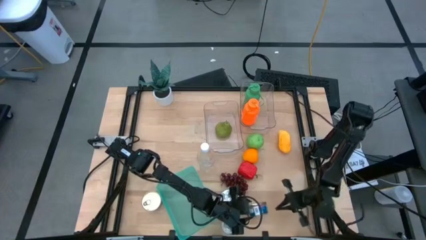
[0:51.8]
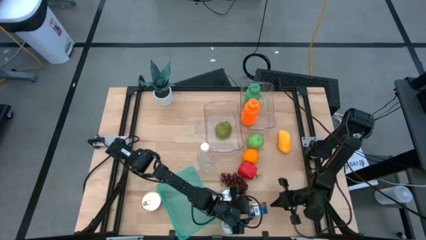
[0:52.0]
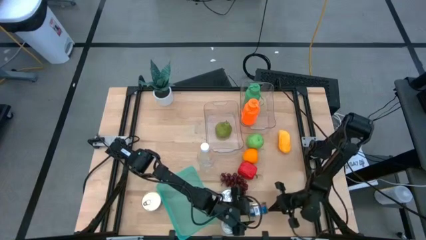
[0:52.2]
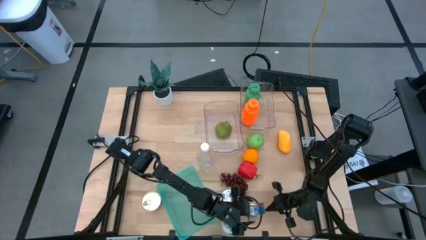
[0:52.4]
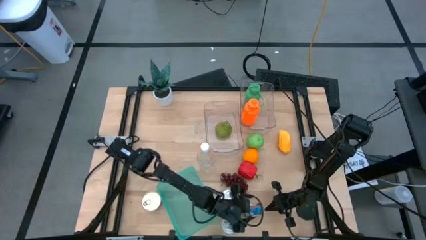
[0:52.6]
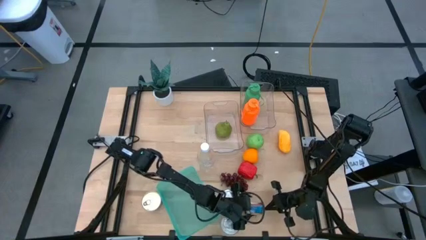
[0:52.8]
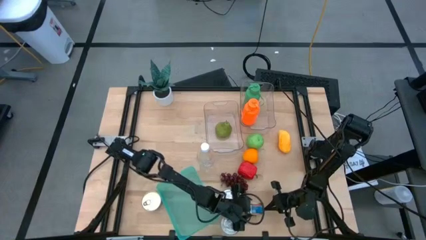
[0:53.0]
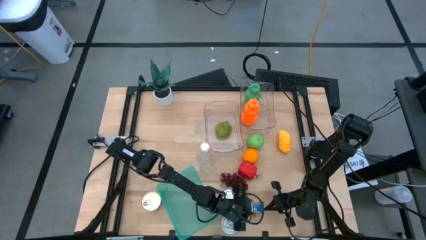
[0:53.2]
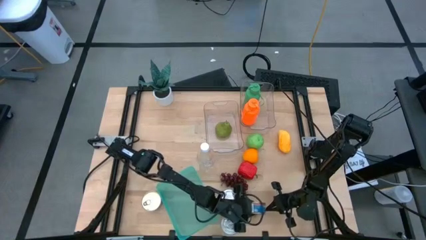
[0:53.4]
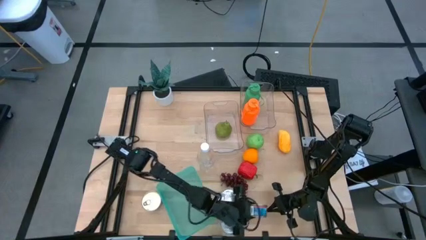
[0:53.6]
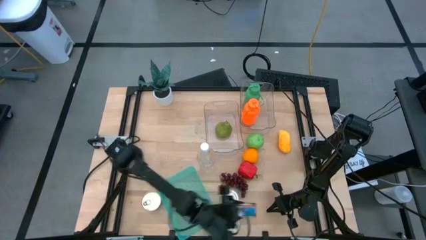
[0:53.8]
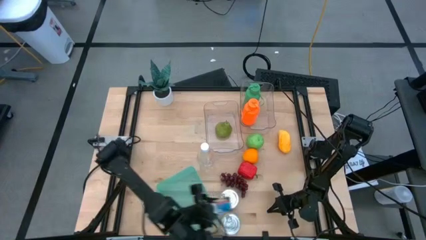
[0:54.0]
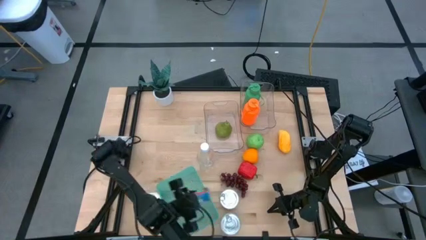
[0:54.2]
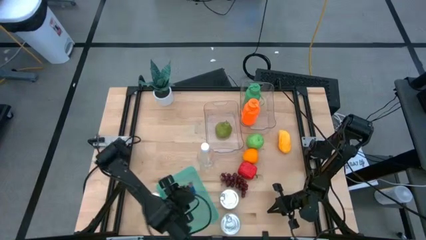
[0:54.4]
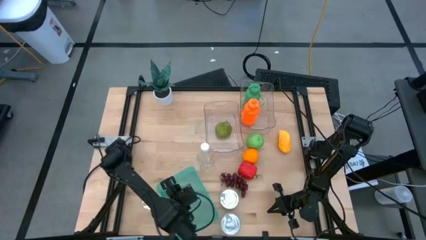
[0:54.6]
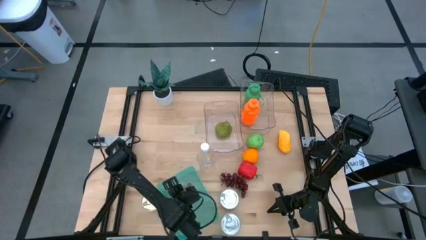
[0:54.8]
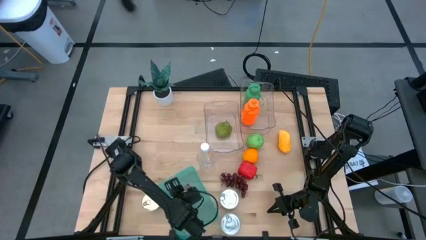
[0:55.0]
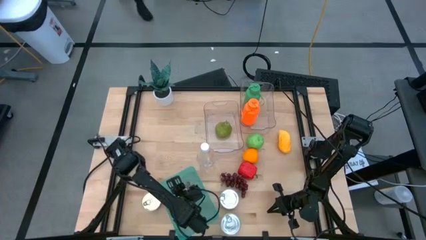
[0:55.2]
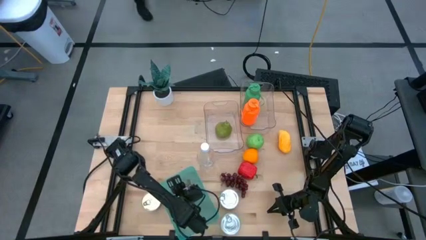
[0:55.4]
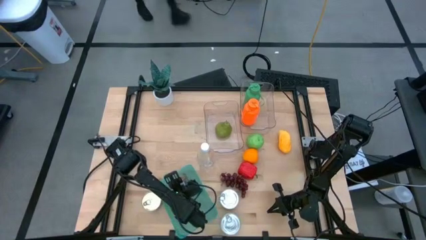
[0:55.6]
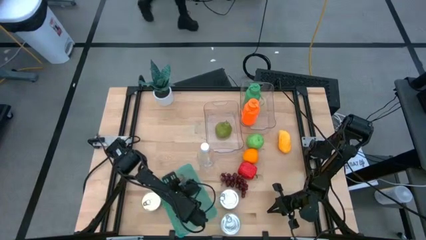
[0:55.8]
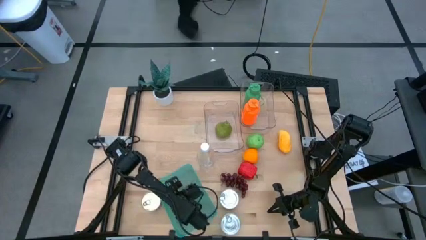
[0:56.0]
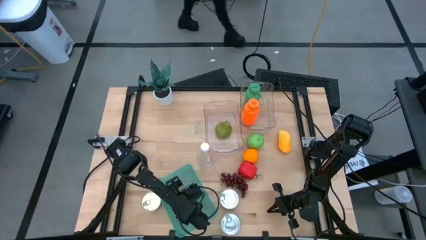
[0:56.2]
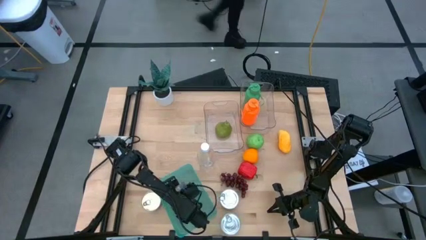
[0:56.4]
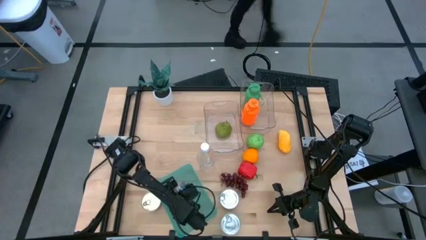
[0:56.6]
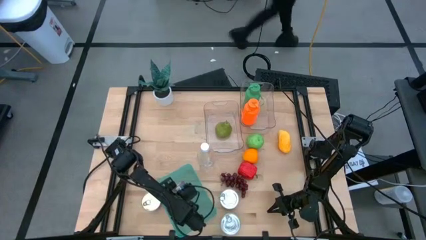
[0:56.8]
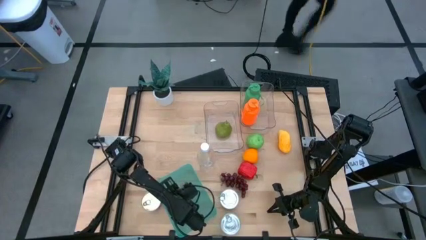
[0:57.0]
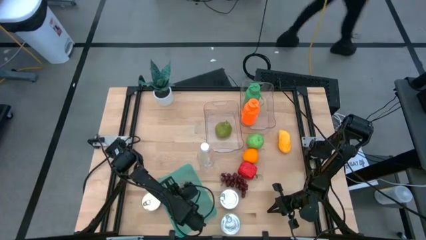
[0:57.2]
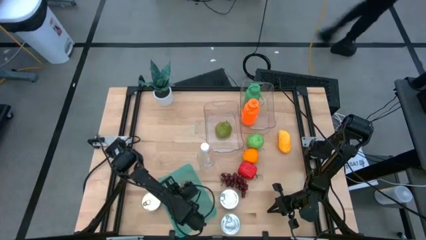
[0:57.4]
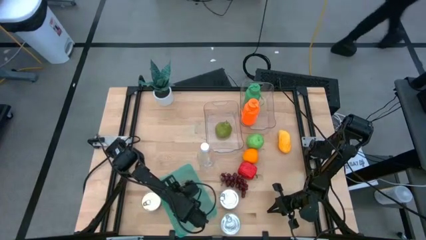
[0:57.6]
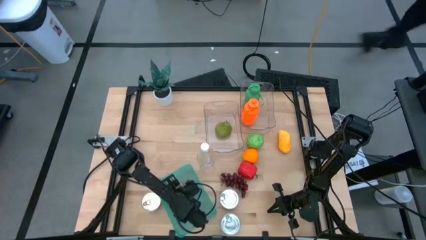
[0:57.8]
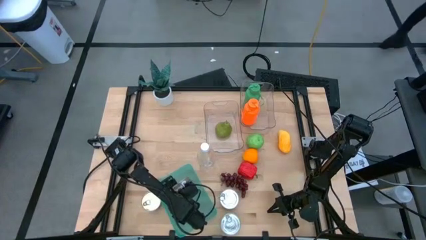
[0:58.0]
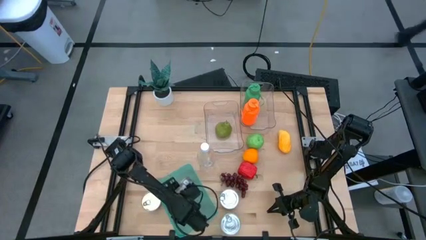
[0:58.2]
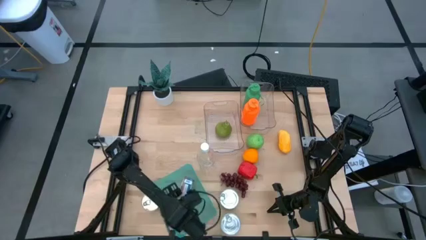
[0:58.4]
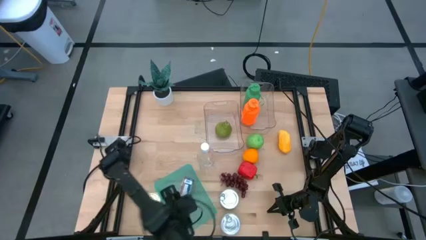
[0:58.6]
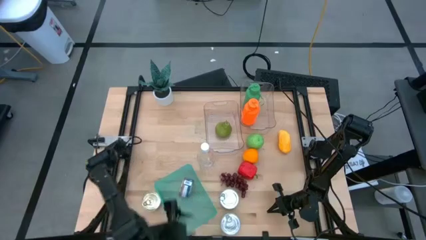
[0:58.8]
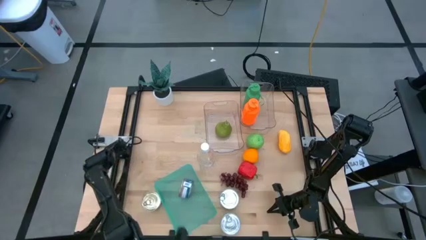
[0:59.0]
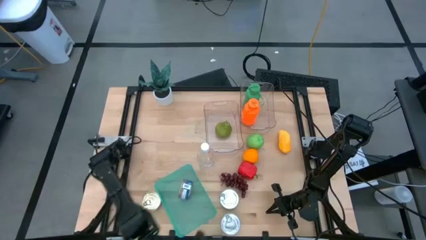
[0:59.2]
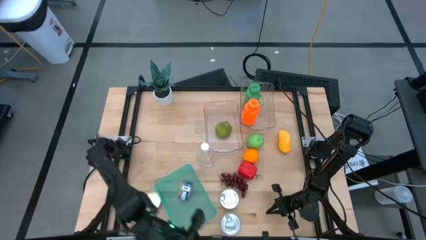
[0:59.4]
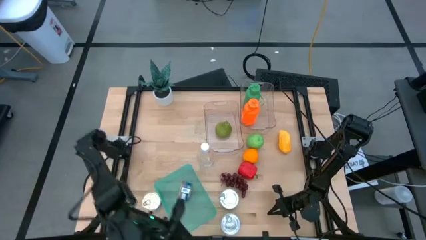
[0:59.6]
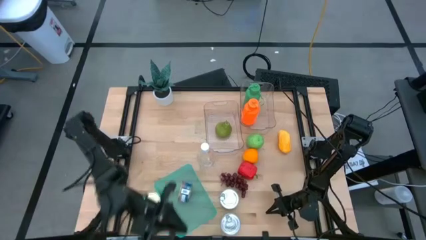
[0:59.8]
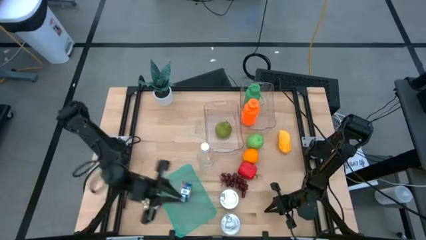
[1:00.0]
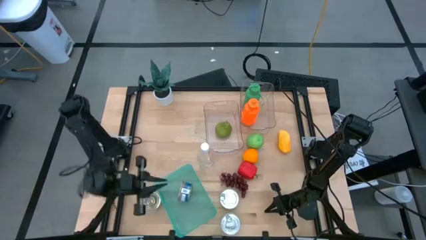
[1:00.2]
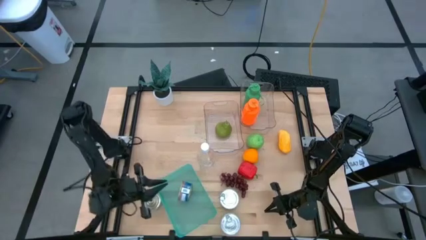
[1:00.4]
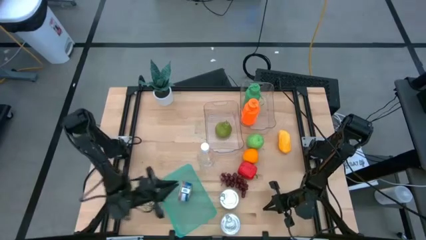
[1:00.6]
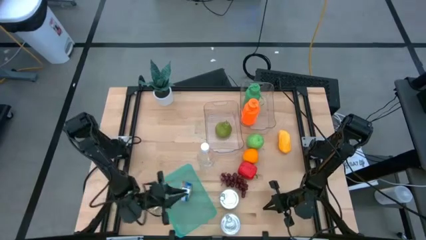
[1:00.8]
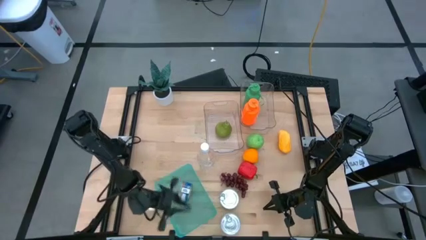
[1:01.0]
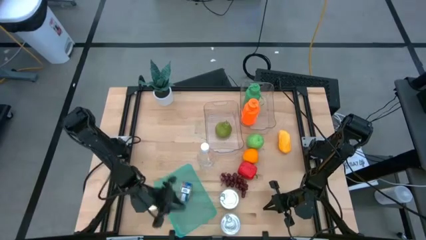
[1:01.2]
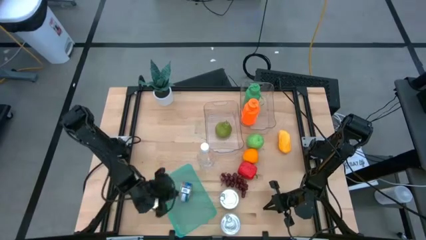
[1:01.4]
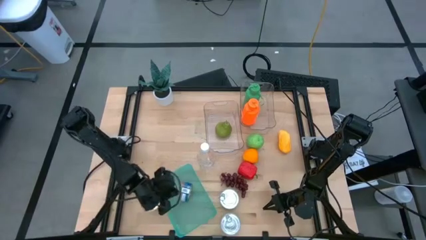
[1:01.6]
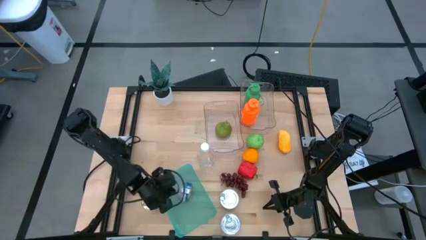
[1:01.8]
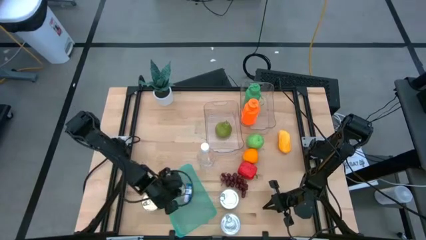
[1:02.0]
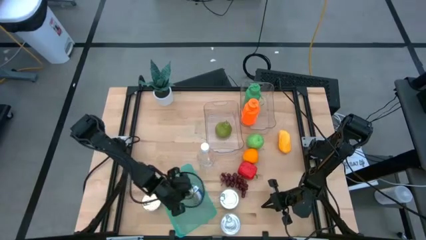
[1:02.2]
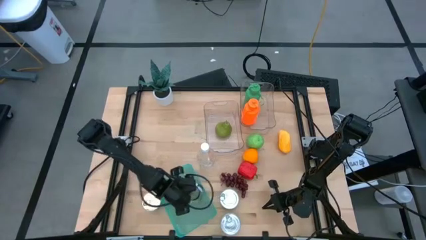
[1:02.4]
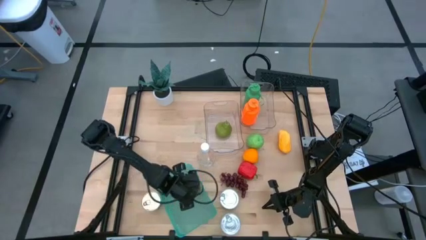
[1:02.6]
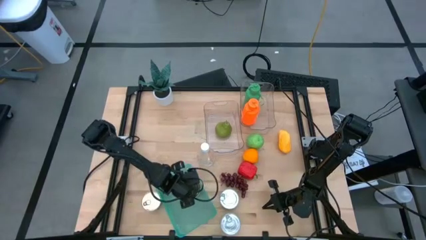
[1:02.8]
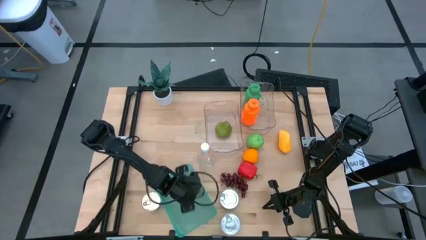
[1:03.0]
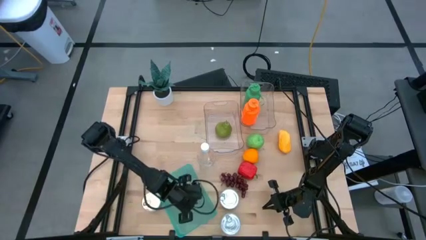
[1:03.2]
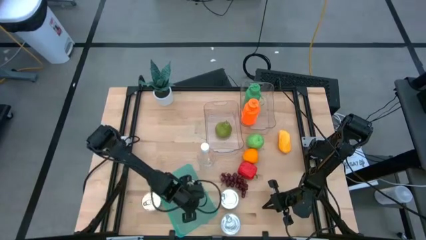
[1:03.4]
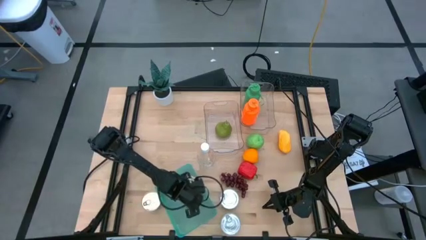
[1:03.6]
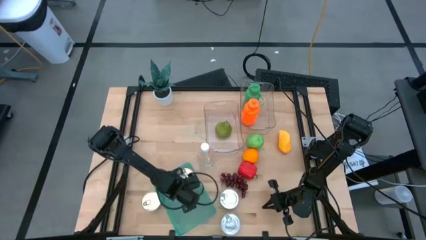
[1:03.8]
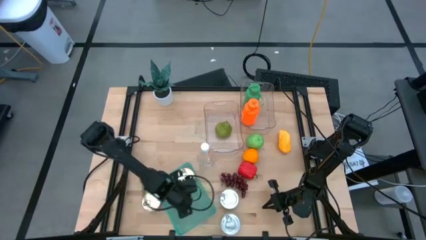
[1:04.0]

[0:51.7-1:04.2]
Task: Pick & Place Food Item
Put the blue tuna can into the green bin

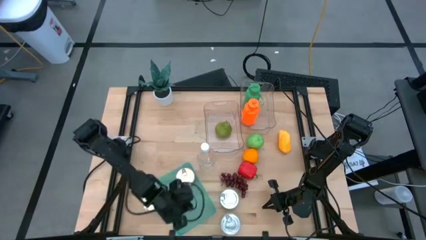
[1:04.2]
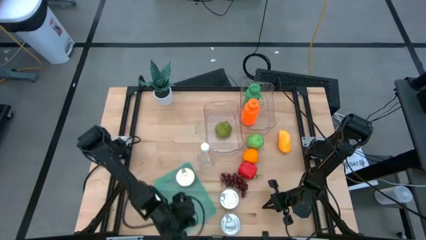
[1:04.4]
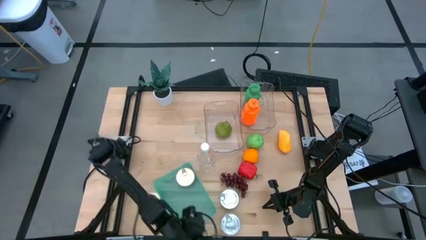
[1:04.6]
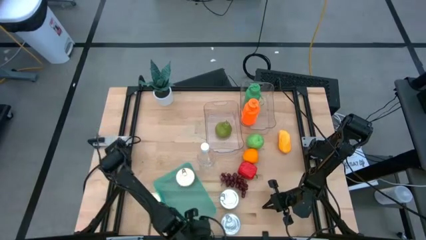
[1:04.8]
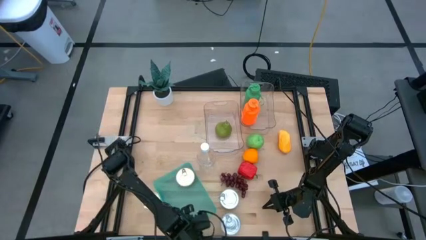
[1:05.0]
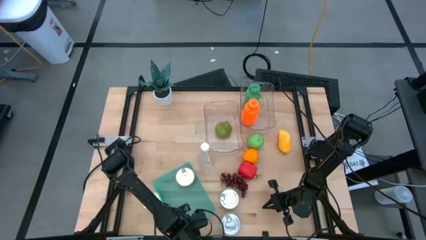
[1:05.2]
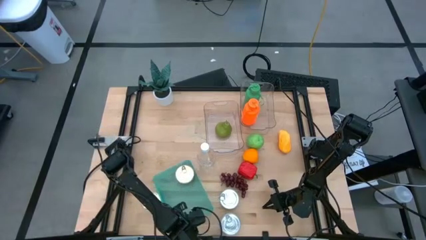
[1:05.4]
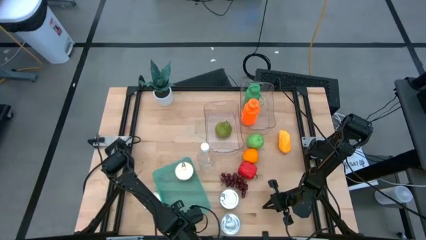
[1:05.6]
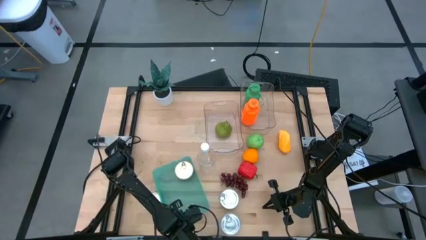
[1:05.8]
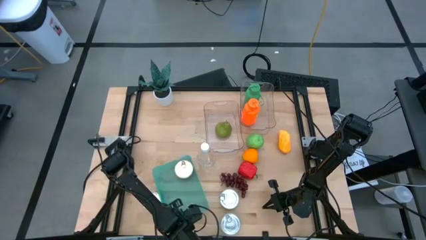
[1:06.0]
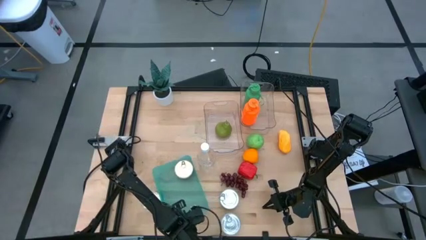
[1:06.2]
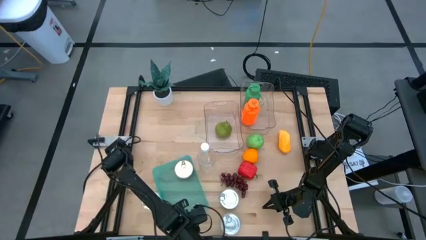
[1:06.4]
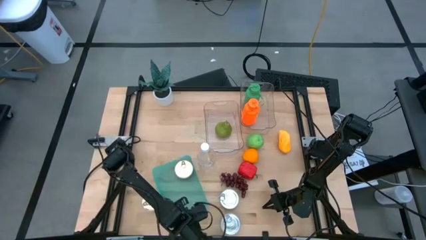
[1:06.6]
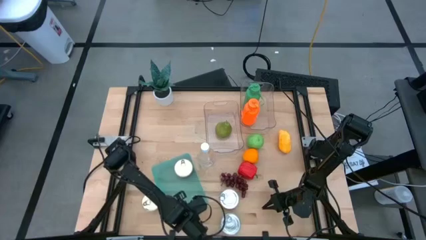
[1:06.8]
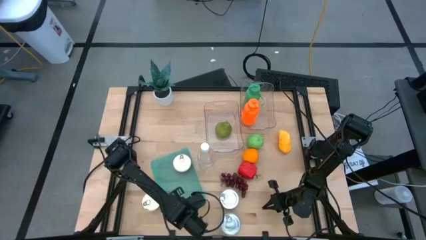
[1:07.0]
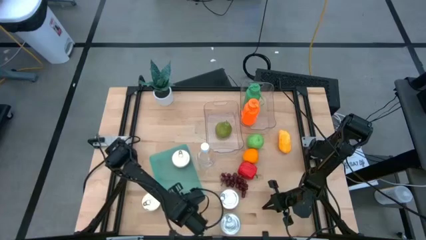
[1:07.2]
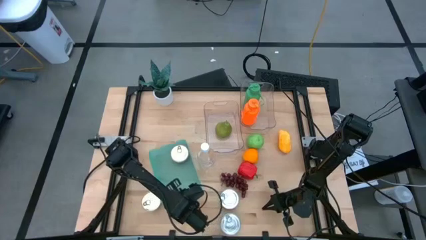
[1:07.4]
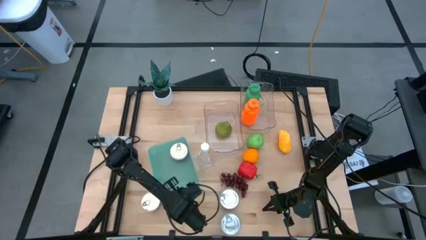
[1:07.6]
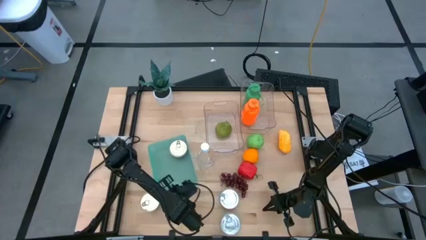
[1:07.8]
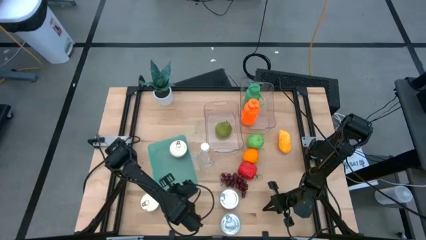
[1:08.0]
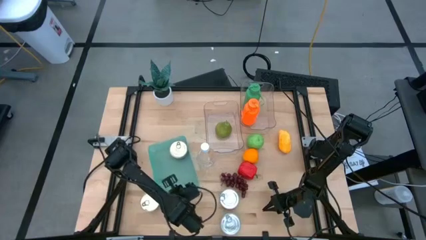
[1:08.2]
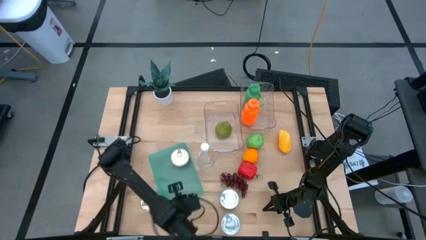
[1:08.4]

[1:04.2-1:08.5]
Adjust the green bin on the table
